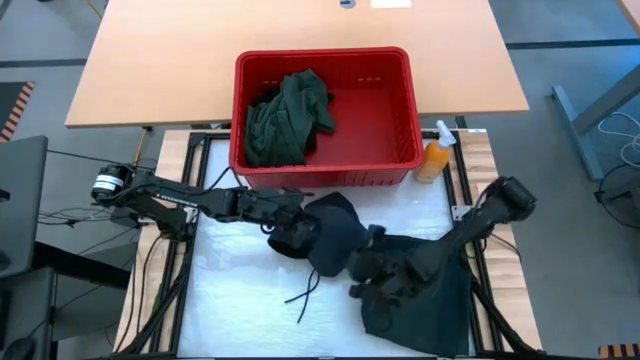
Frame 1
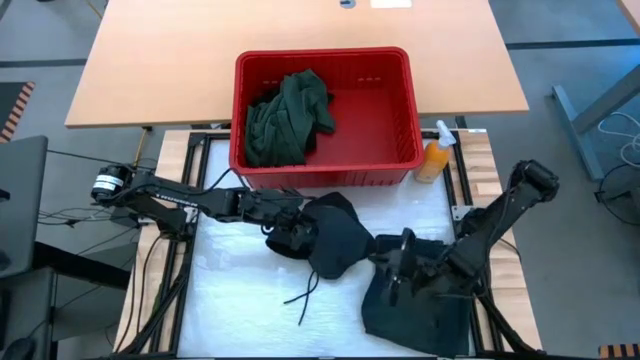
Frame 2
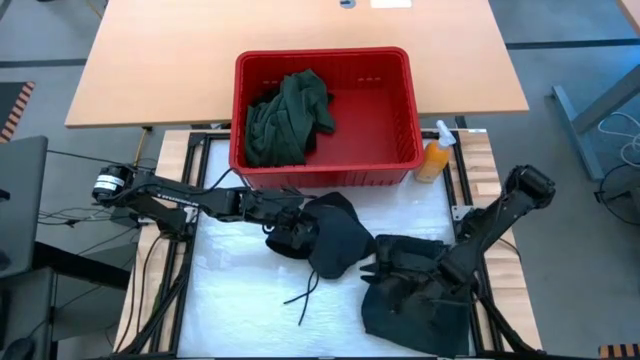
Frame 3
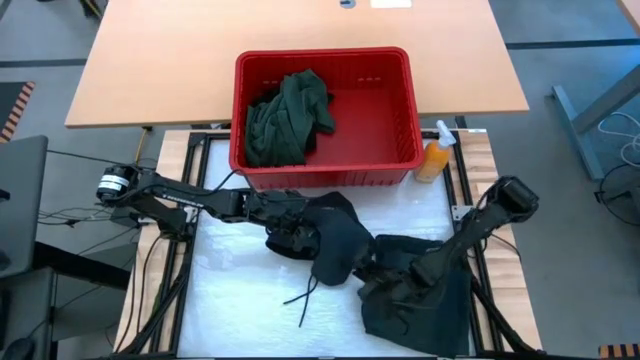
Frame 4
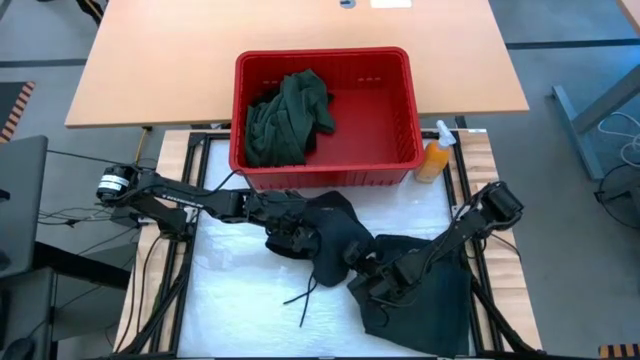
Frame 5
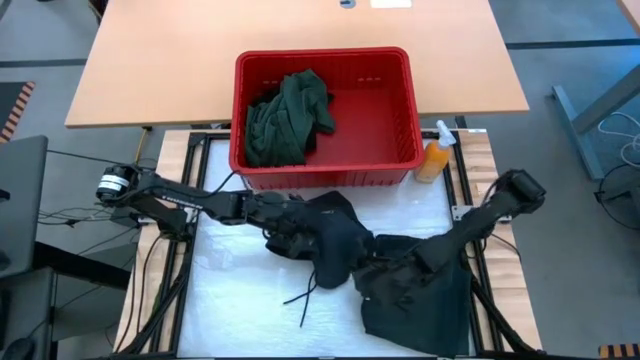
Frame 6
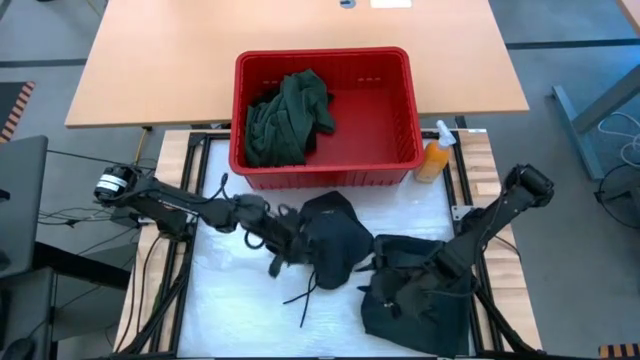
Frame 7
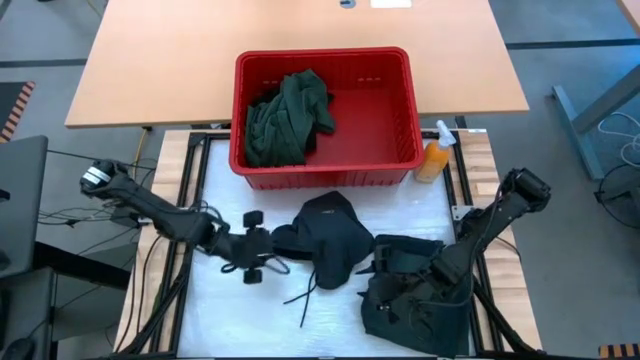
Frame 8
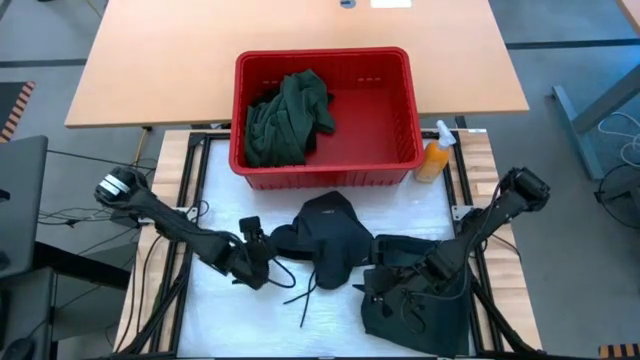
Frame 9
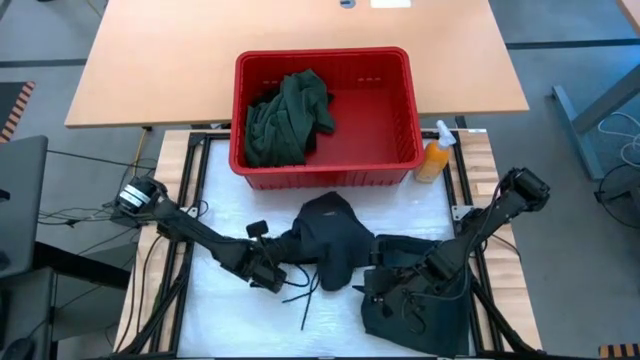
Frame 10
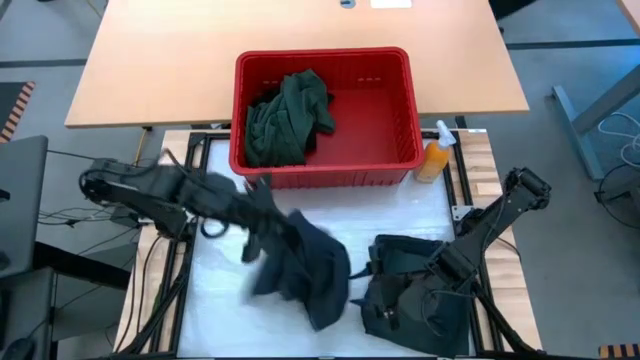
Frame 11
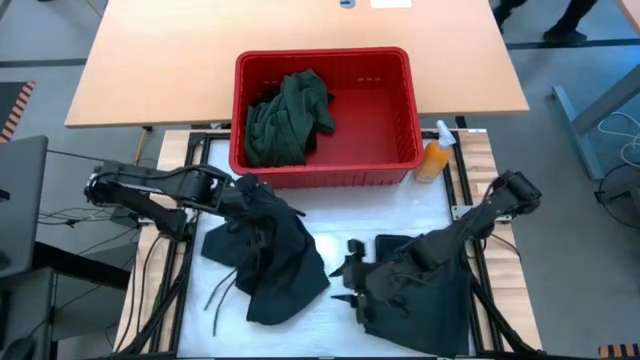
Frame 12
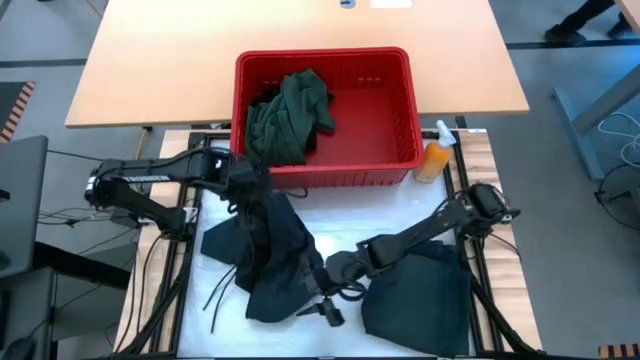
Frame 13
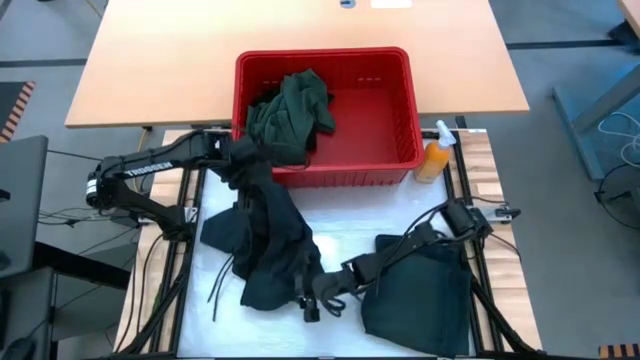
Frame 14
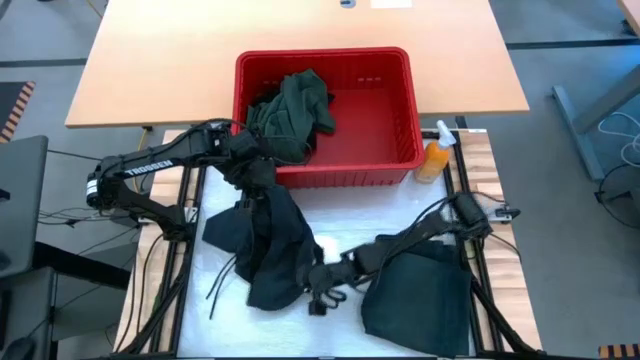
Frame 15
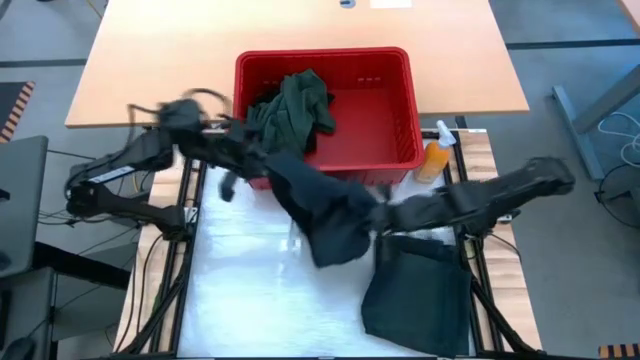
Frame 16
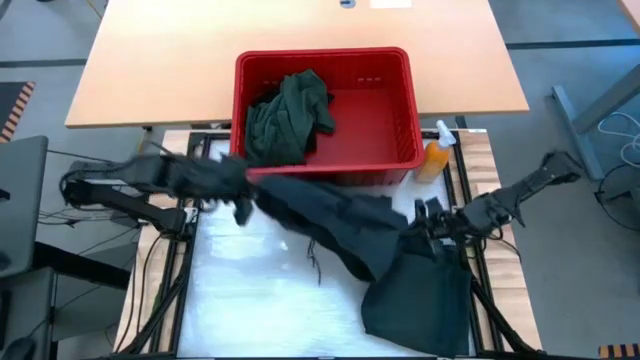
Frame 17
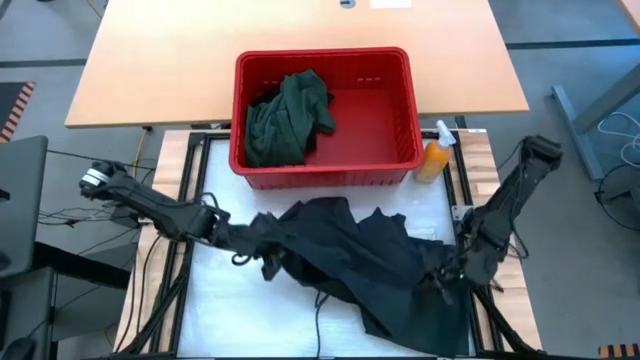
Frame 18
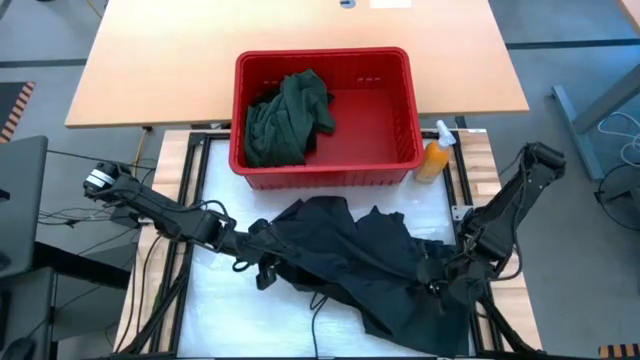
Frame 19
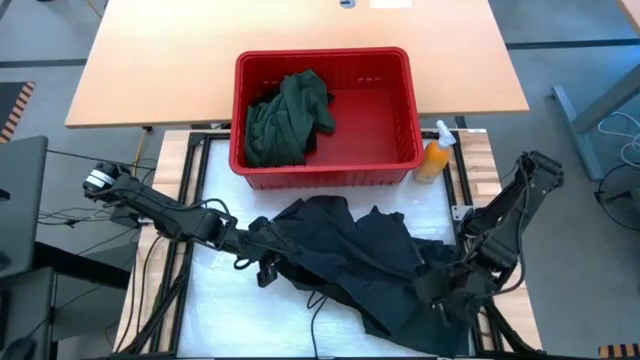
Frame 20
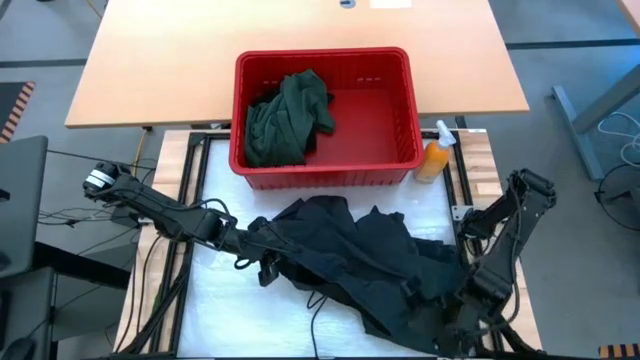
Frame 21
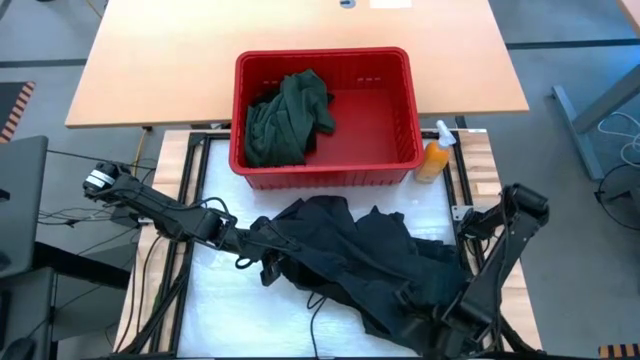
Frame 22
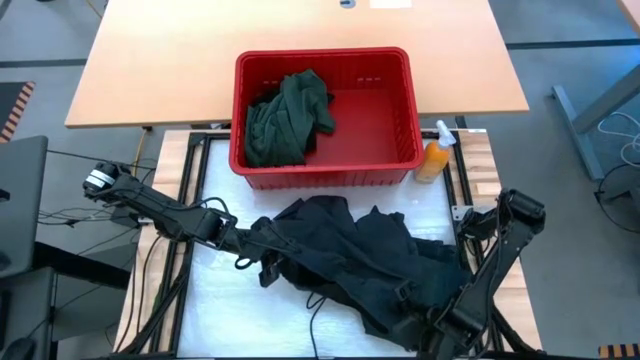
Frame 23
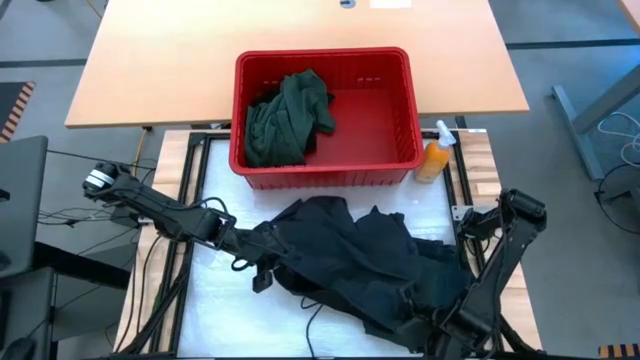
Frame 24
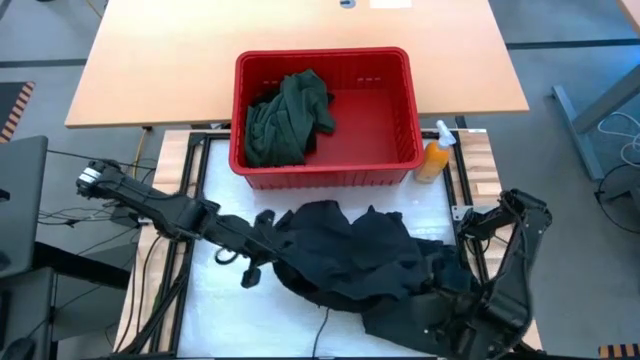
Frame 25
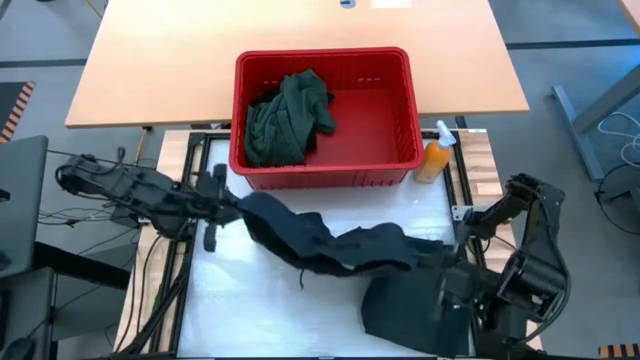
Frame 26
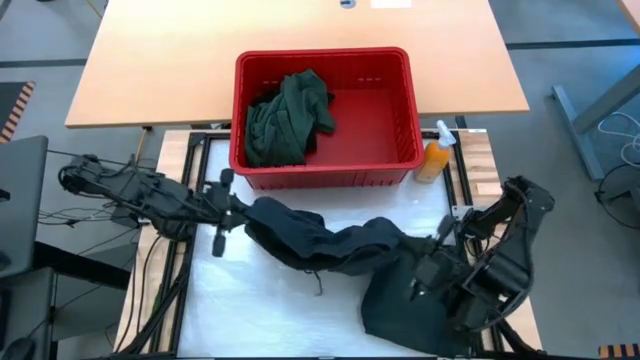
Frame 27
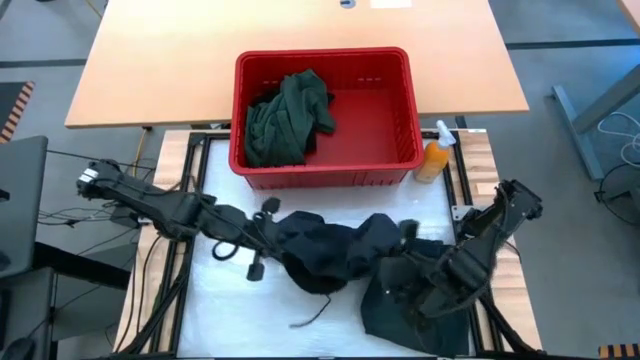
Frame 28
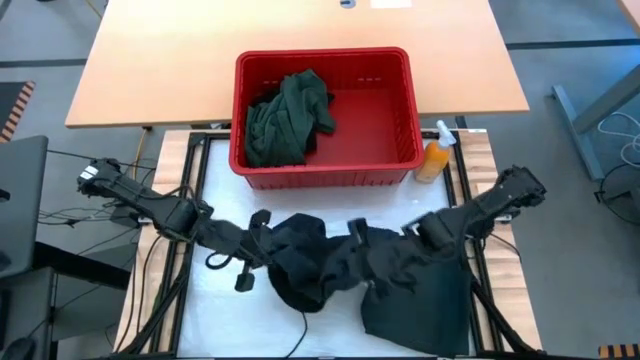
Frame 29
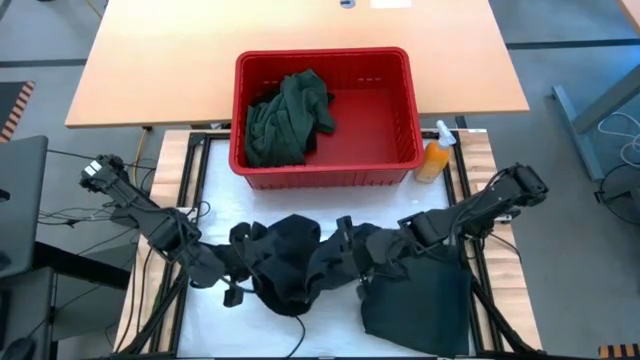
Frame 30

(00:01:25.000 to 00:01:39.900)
Task: Fold laundry
Fold the gray shorts

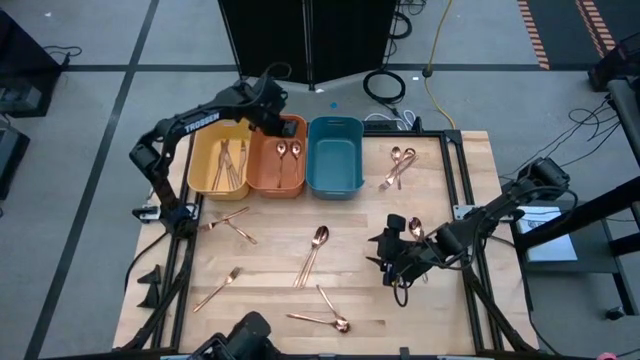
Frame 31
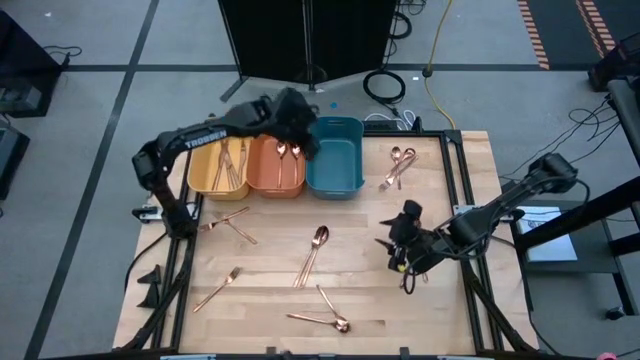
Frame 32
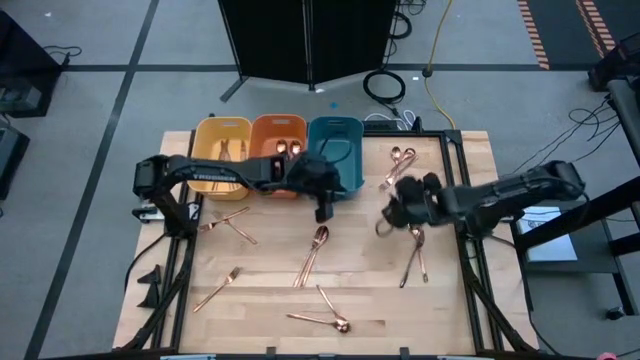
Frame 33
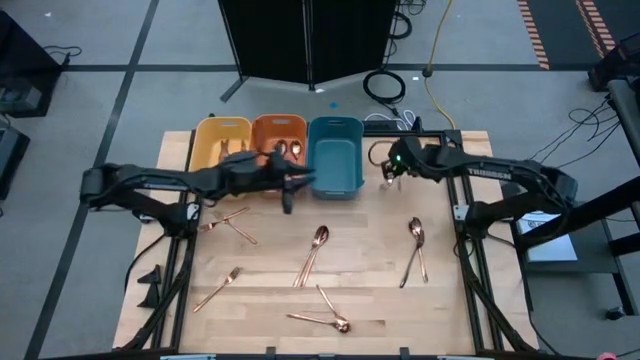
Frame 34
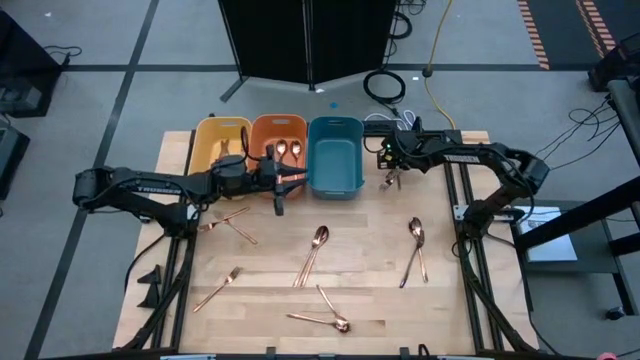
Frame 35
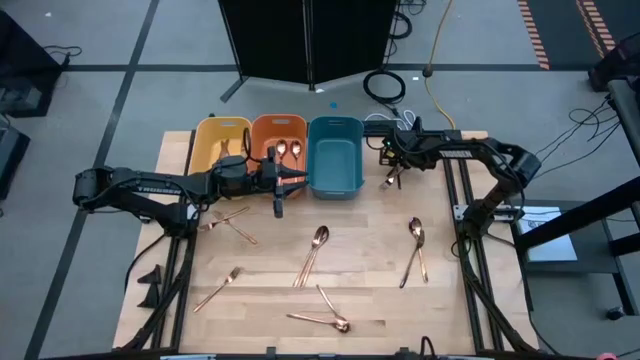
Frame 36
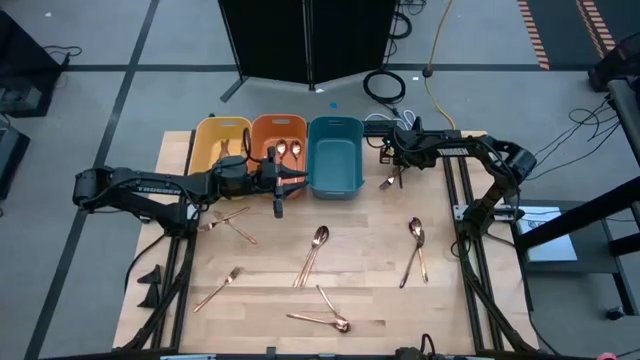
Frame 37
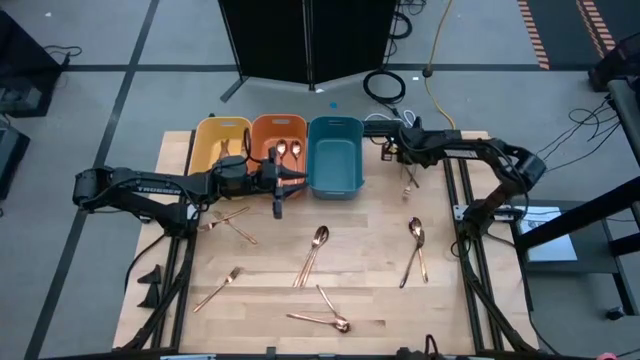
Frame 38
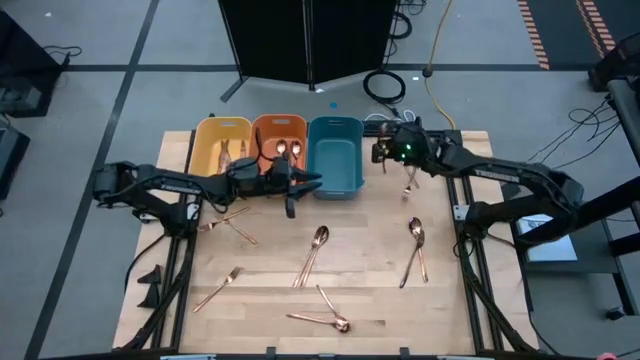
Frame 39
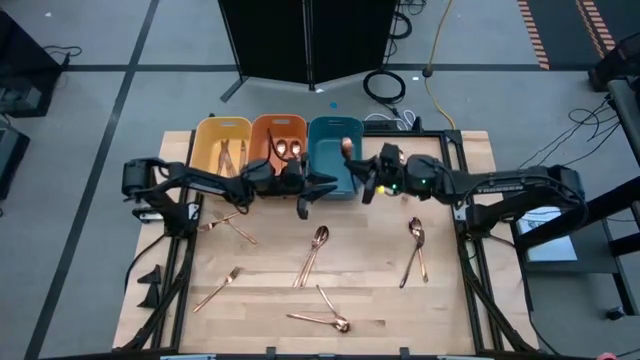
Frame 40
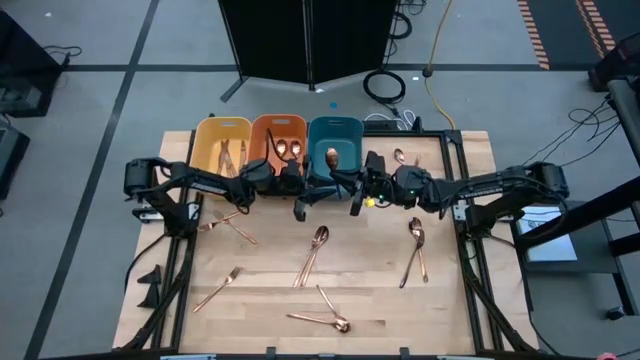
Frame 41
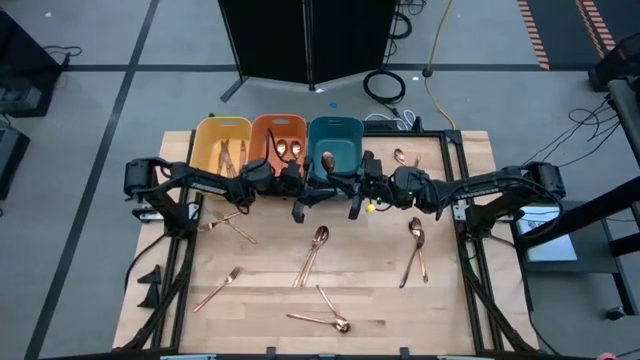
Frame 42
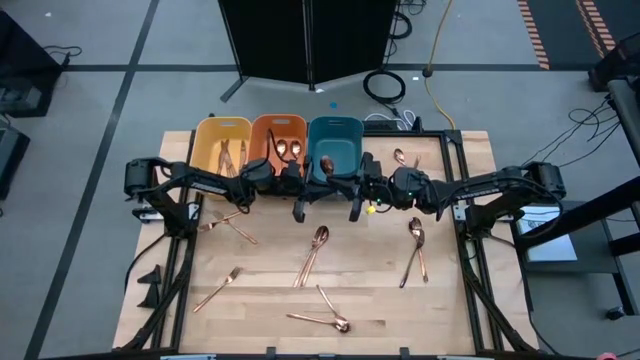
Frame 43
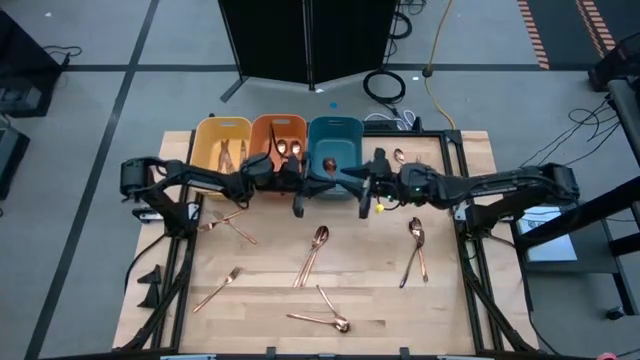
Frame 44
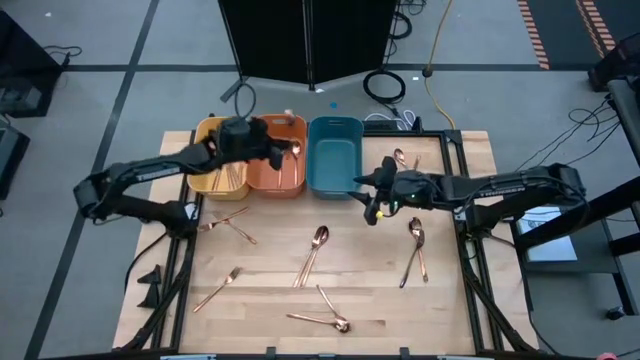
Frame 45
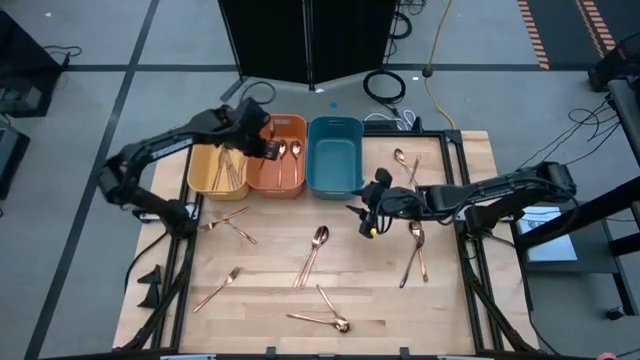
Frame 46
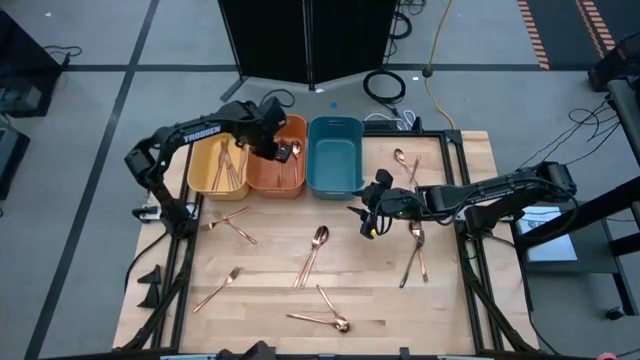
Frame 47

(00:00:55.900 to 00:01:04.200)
Task: Sort silverware
Put the gold spoon into the orange bin
